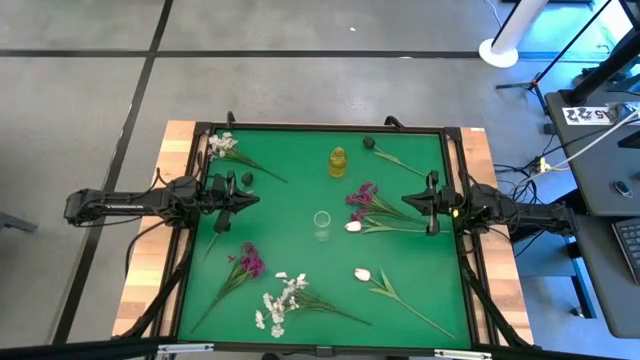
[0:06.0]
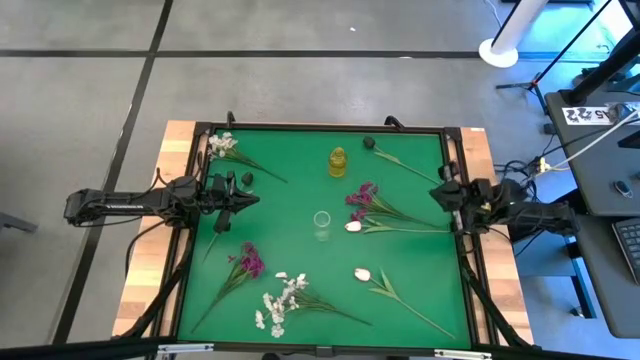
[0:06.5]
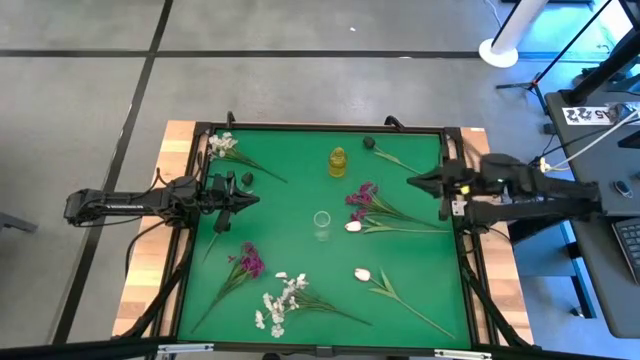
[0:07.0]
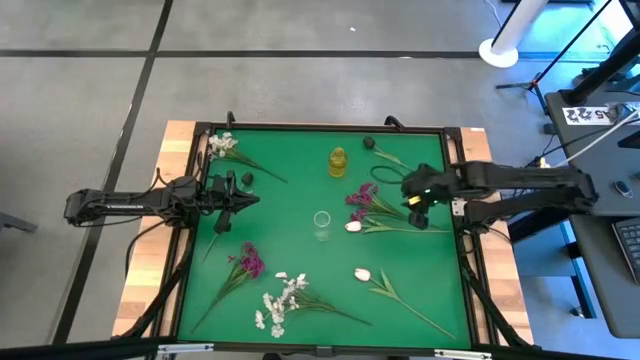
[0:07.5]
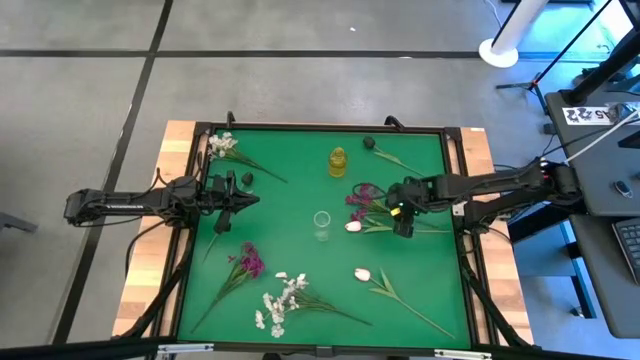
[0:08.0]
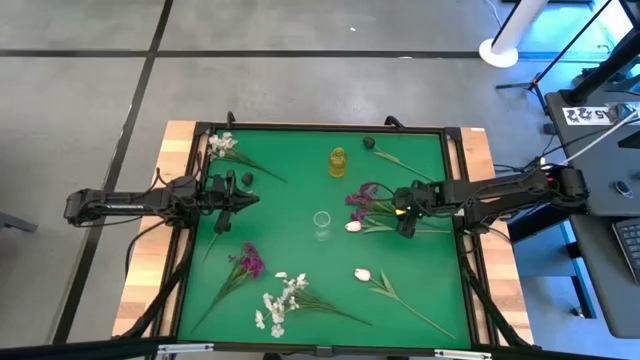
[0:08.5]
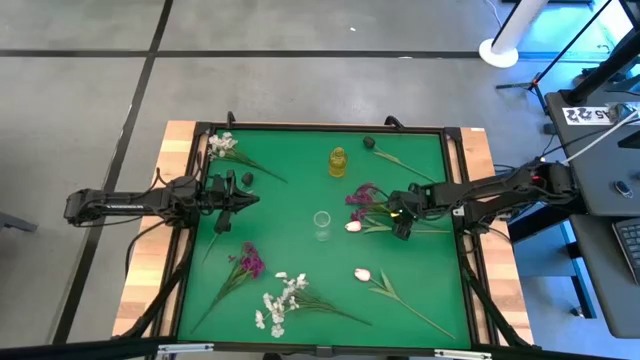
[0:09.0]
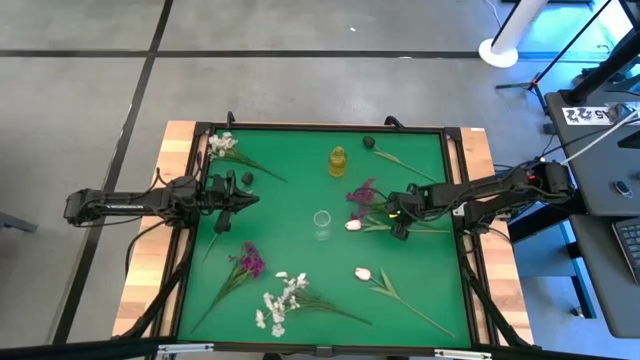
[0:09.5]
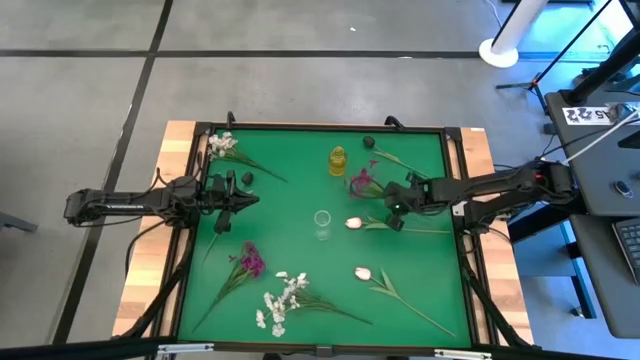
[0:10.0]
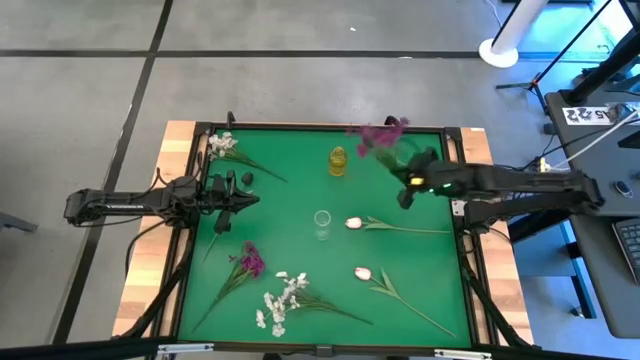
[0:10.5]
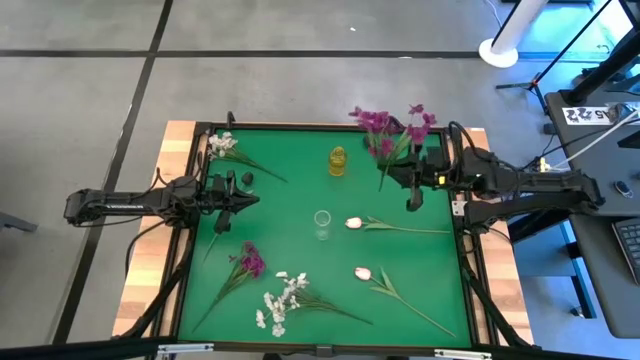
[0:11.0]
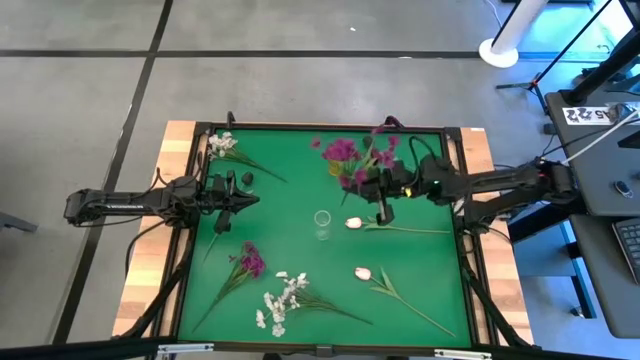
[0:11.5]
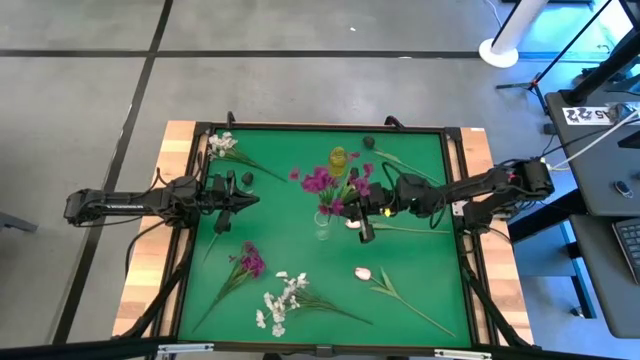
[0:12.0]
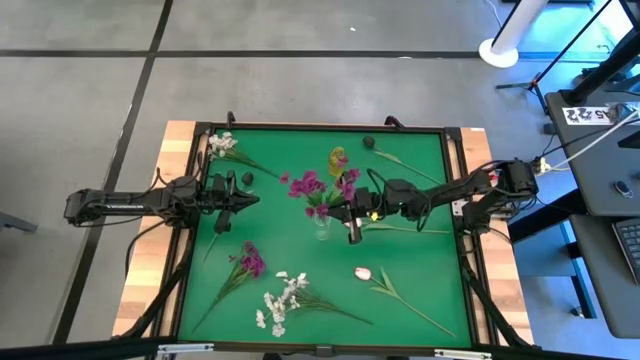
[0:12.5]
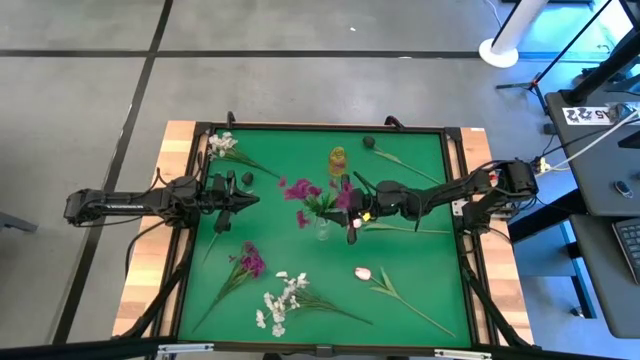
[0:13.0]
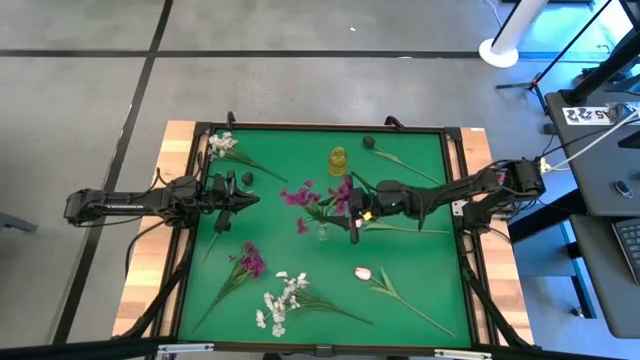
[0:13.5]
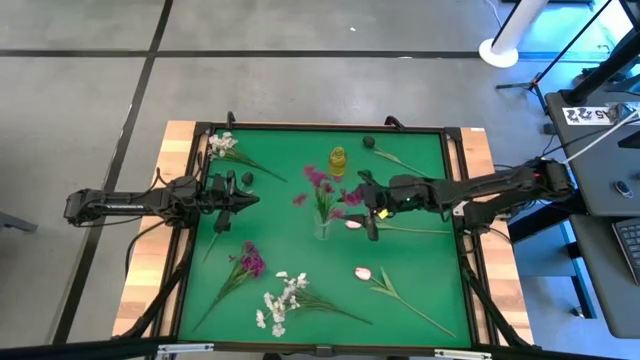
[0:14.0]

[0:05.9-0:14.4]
Task: Sort flowers into vase by color
Put the right violet flowers into the transparent vase

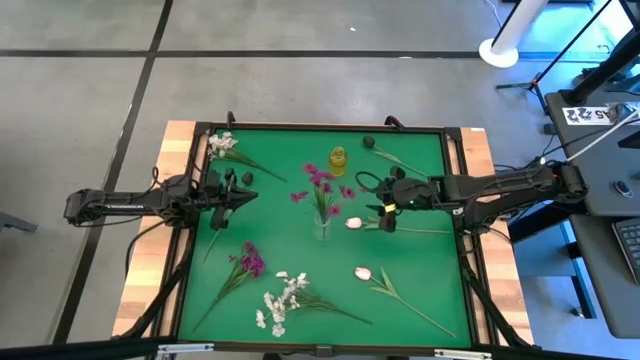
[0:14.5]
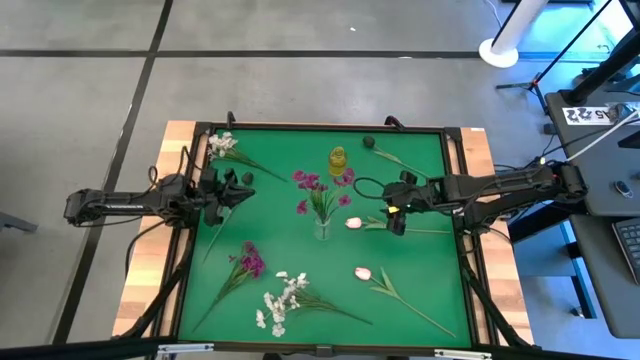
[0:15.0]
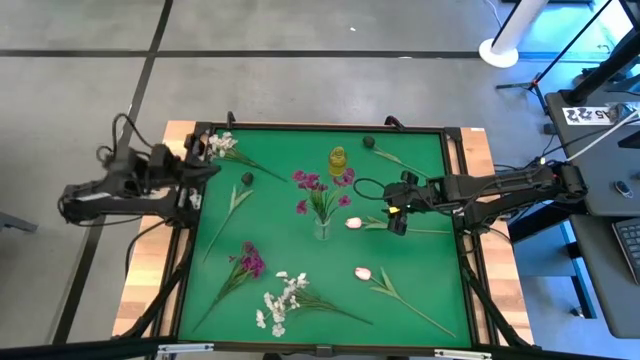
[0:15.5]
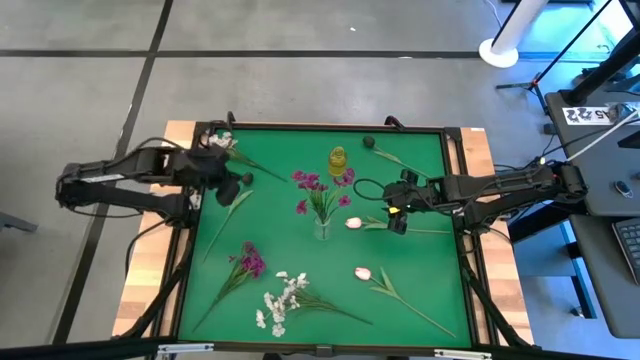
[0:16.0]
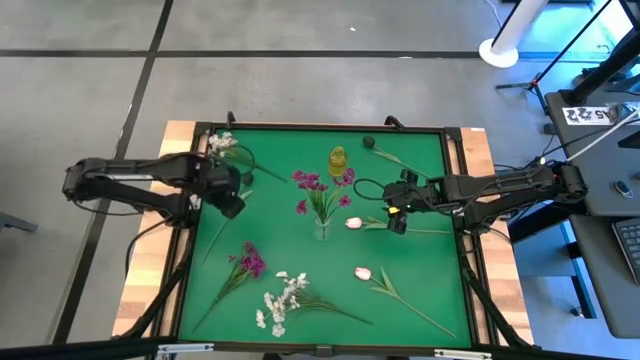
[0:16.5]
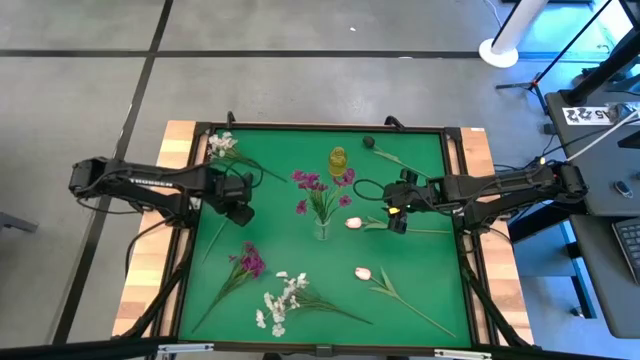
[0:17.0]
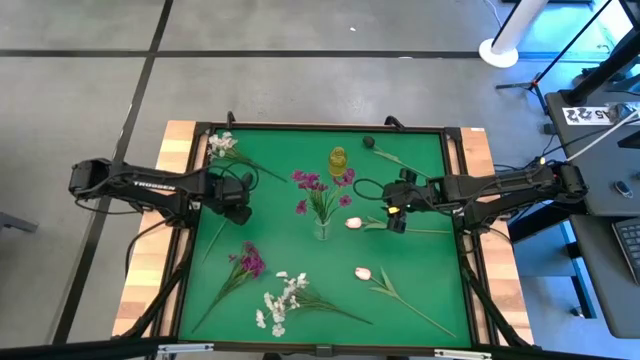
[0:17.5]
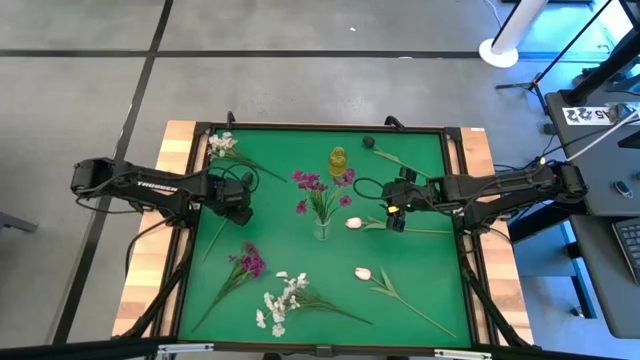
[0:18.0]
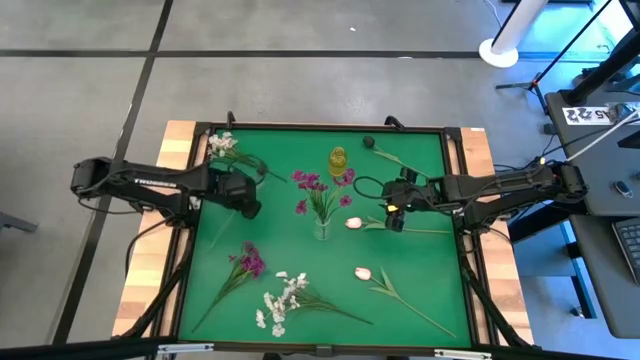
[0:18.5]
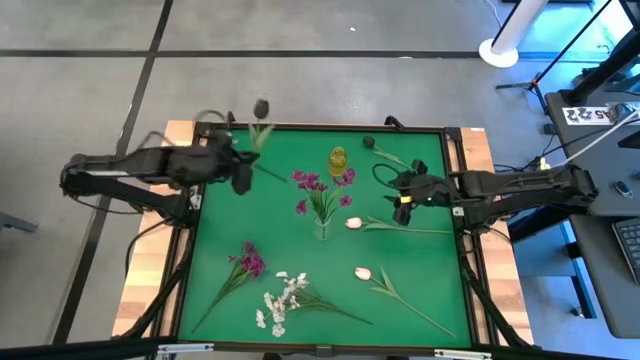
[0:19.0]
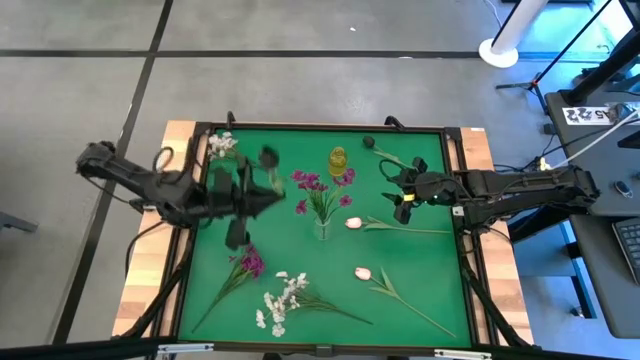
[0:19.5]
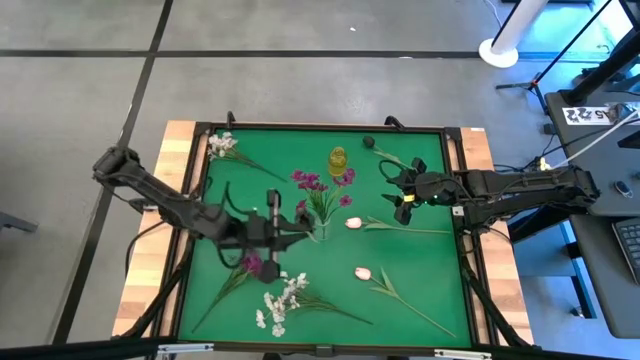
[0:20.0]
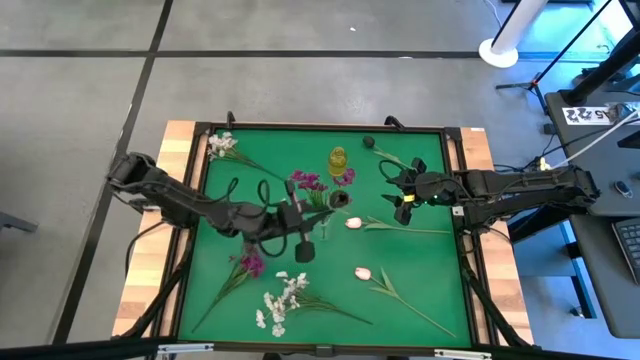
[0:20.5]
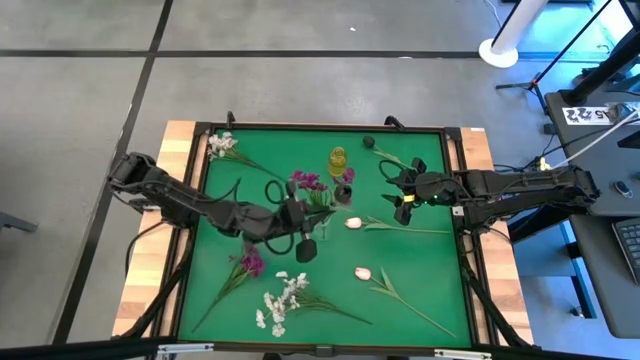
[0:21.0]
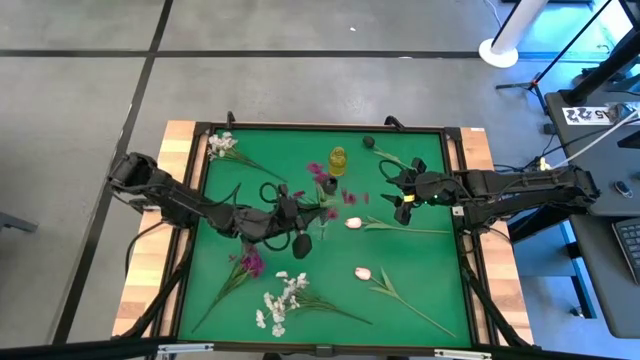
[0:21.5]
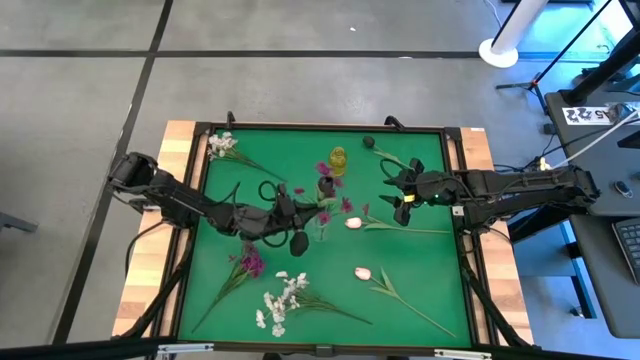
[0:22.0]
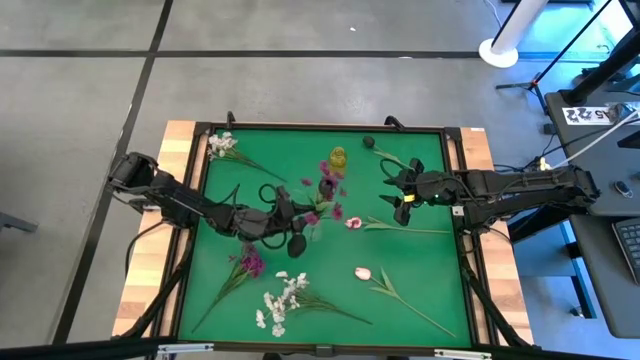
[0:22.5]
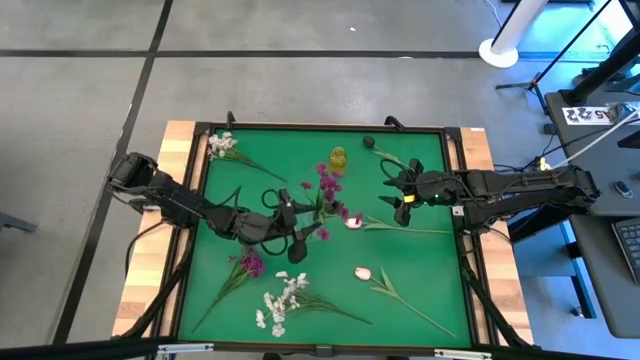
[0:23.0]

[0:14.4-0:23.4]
Put the left black flower into the transparent vase

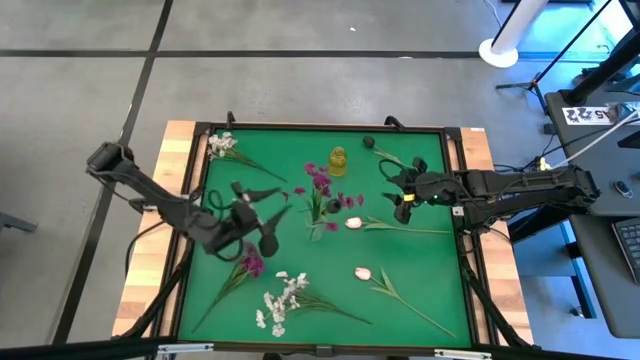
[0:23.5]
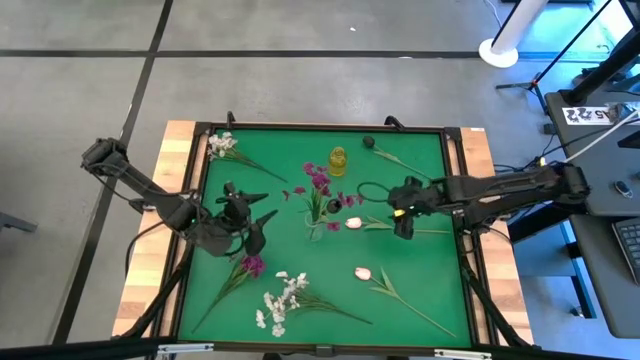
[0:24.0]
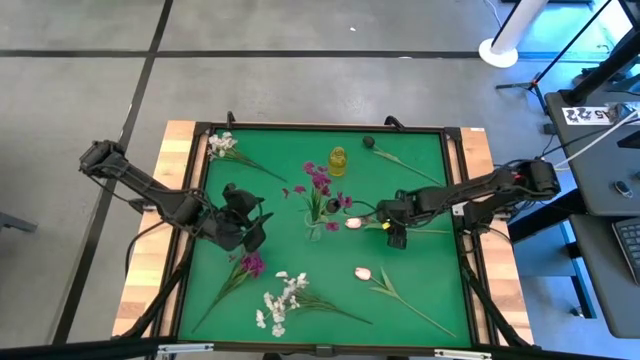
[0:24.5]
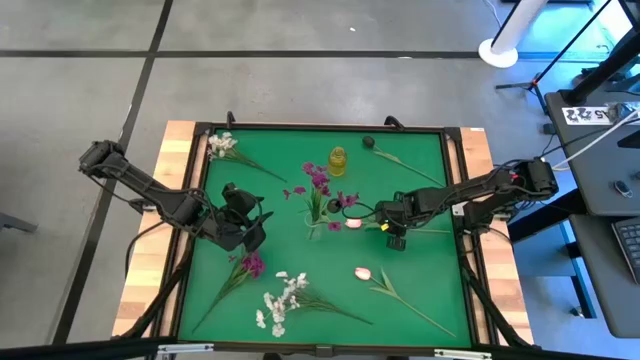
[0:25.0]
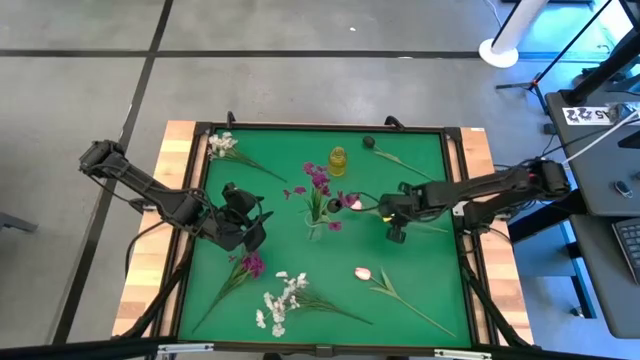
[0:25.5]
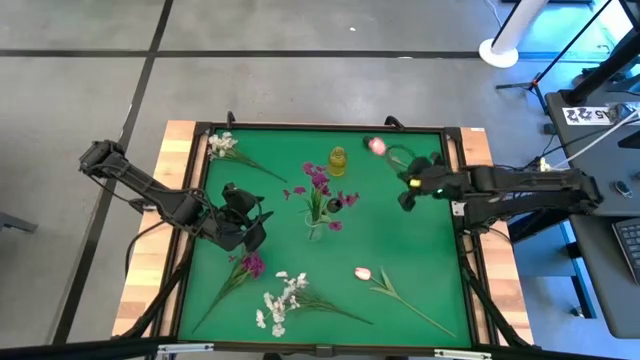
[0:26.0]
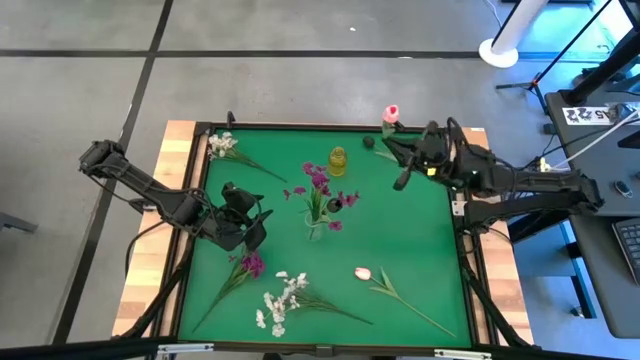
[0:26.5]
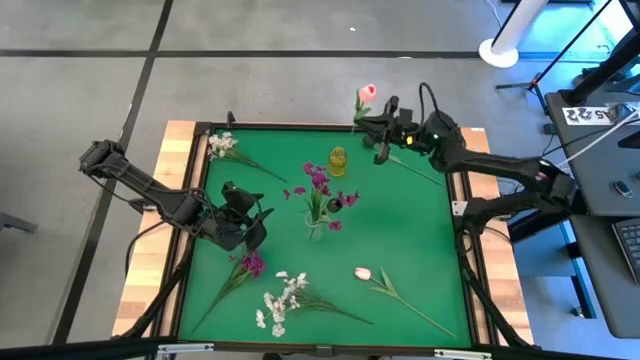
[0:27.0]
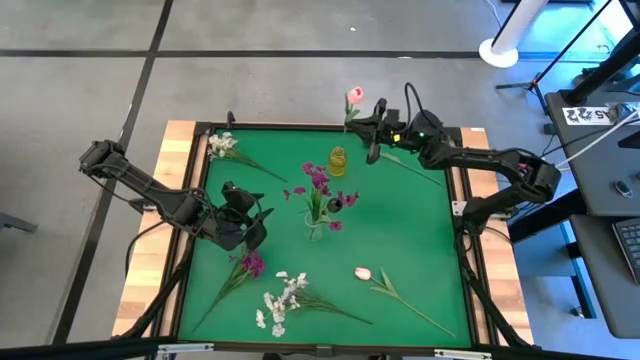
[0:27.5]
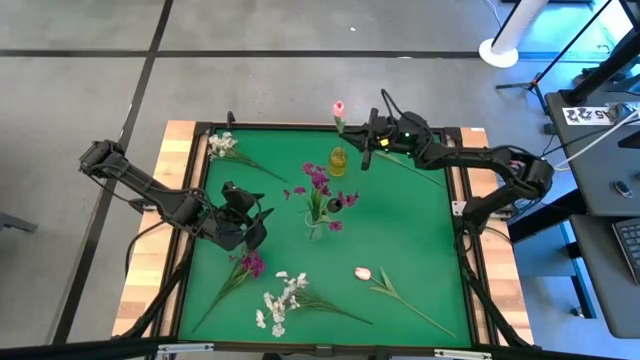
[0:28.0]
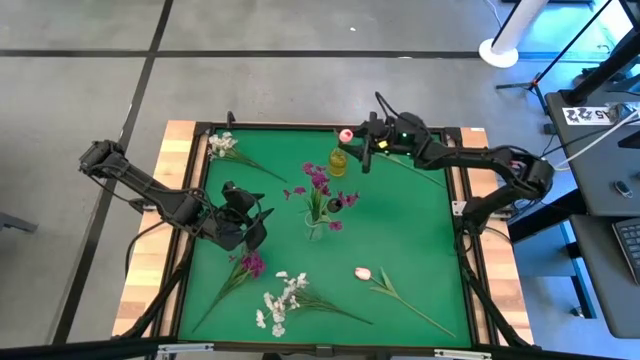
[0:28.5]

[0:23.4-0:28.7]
Put the top pink flower into the yellow vase
